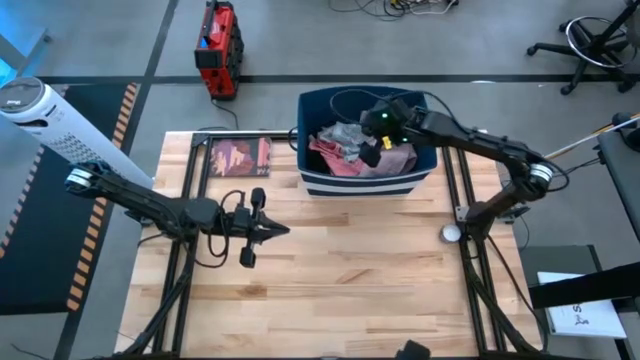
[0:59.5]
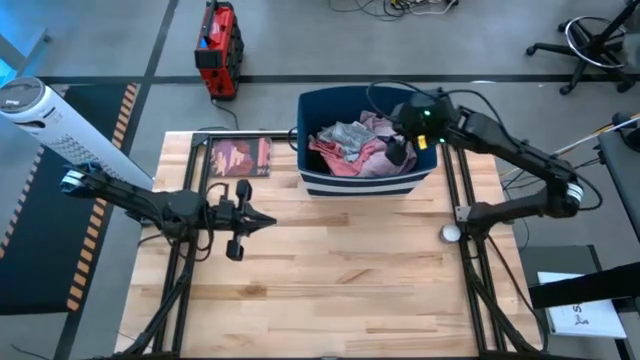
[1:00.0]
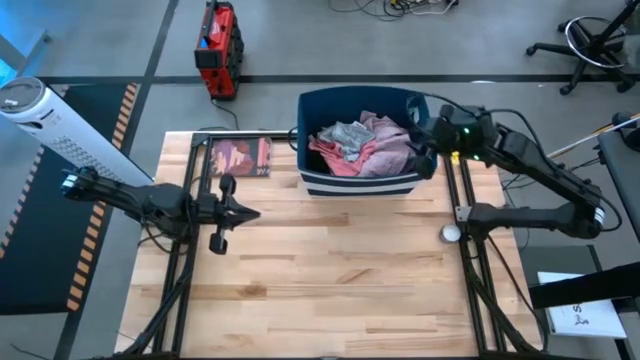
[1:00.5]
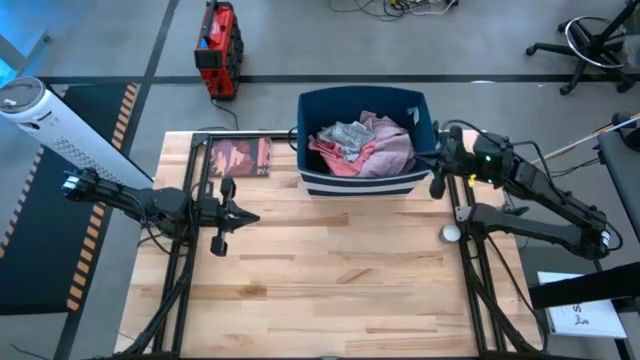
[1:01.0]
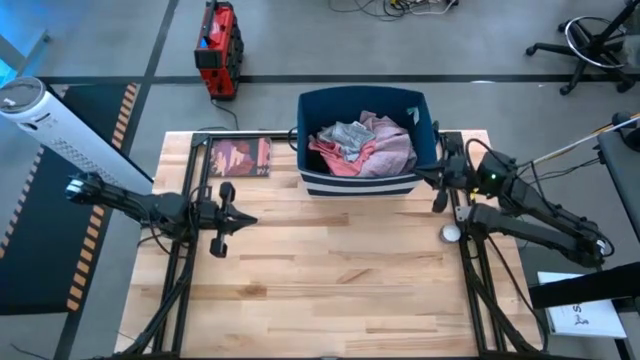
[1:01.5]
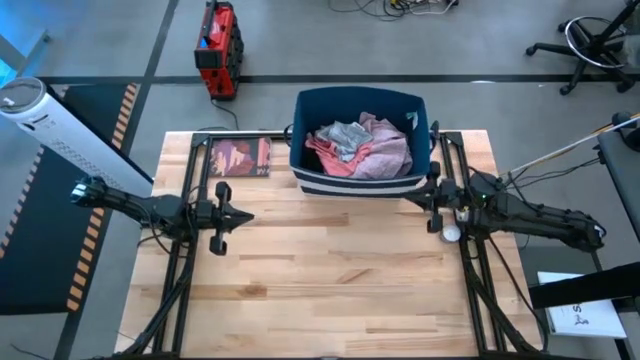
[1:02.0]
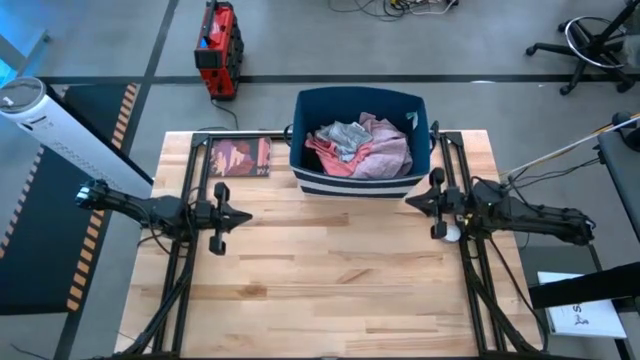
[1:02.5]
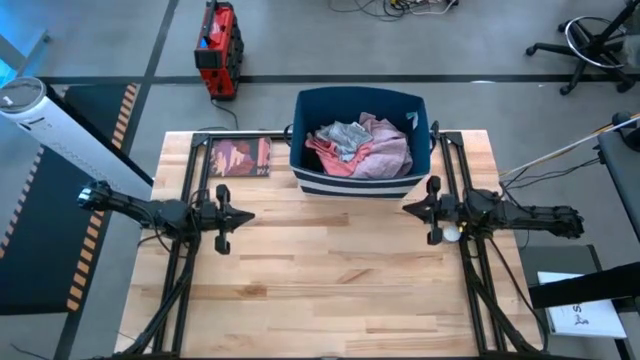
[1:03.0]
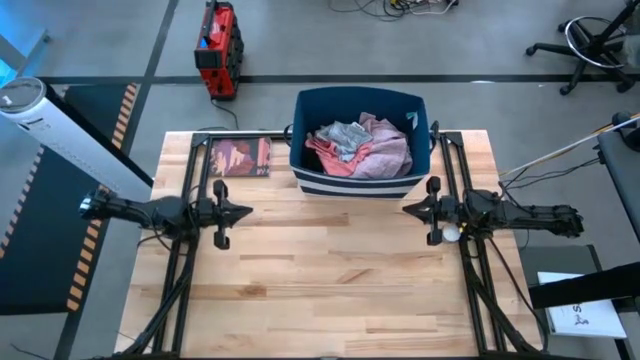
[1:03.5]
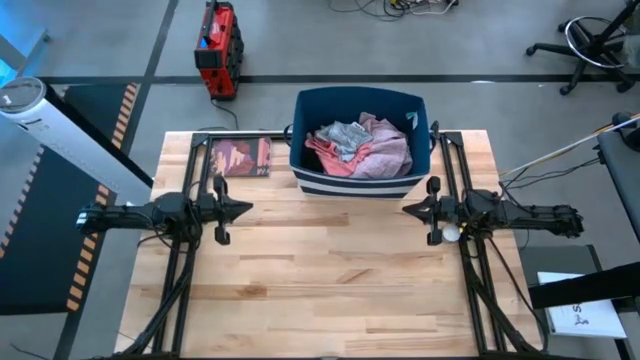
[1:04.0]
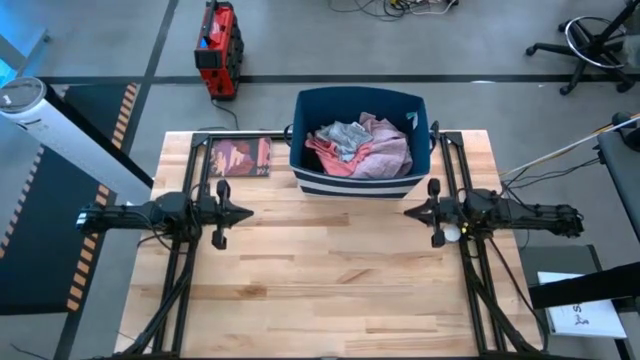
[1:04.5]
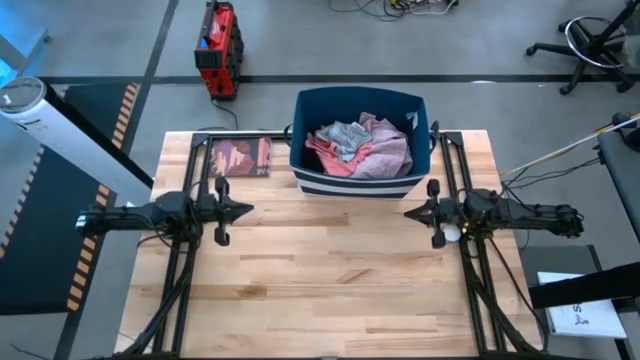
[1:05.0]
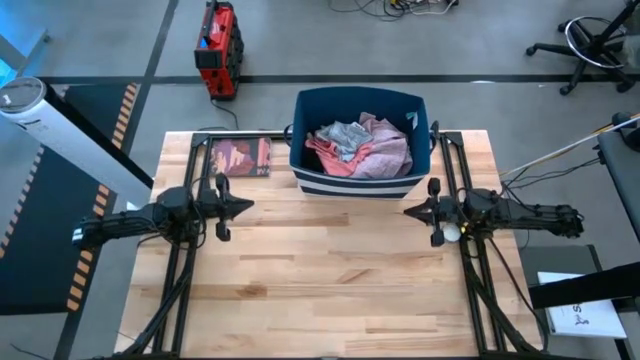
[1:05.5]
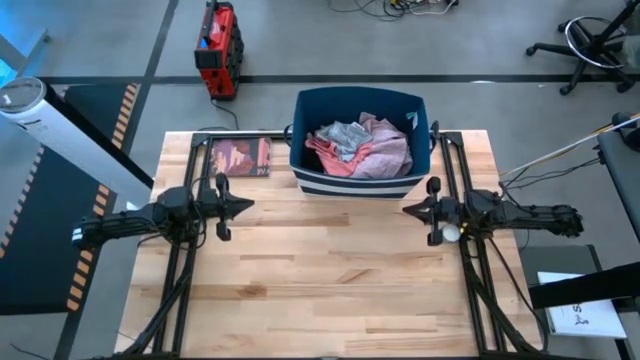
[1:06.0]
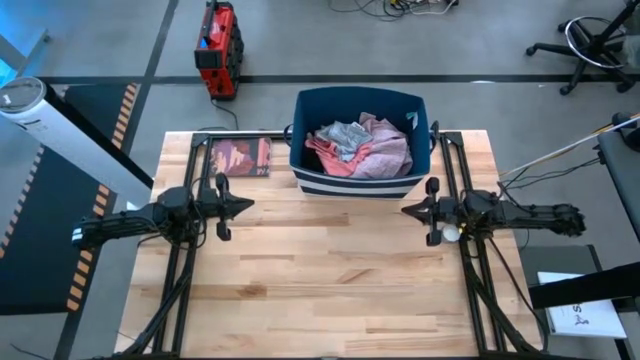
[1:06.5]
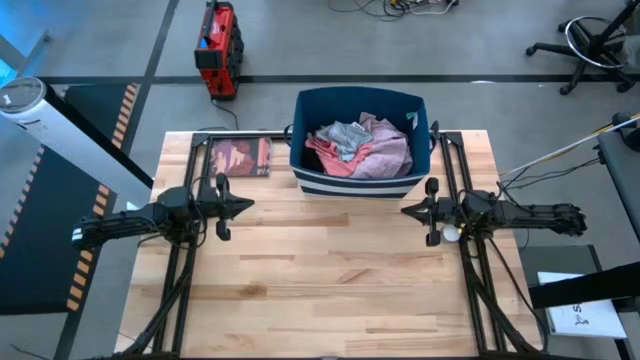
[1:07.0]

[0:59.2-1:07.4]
Task: Sort clothes
Return to Home Position

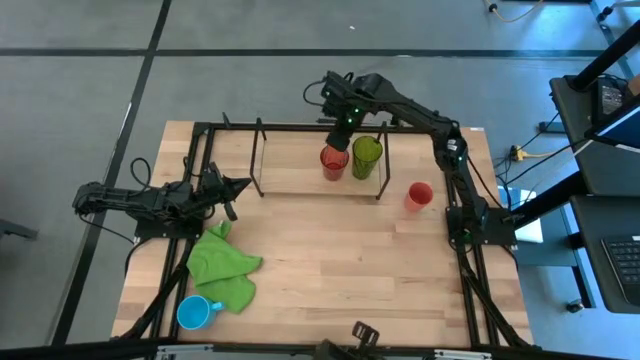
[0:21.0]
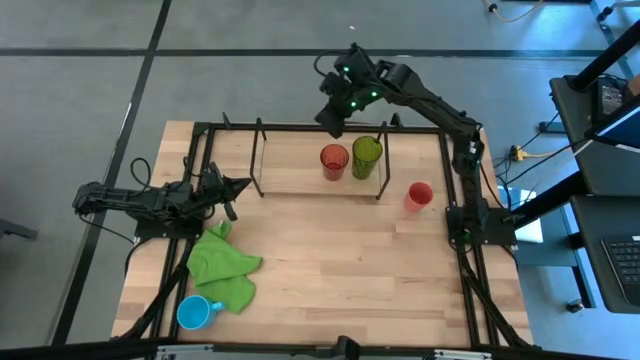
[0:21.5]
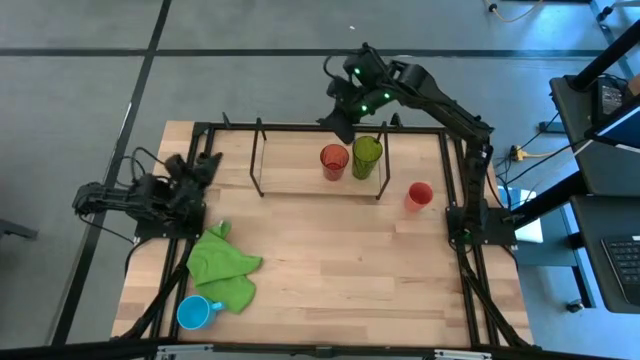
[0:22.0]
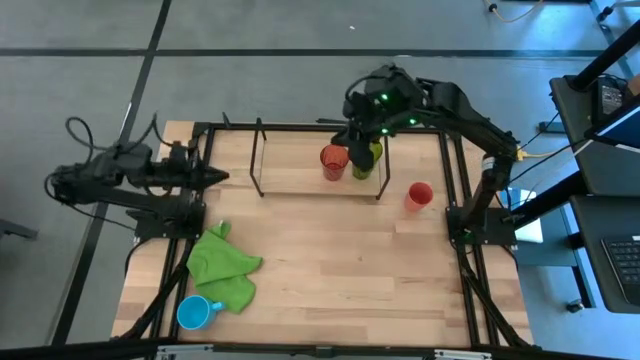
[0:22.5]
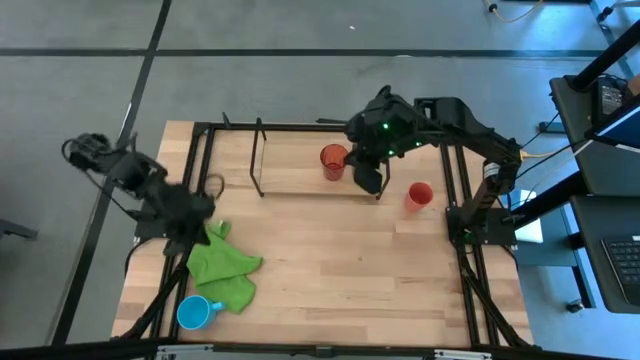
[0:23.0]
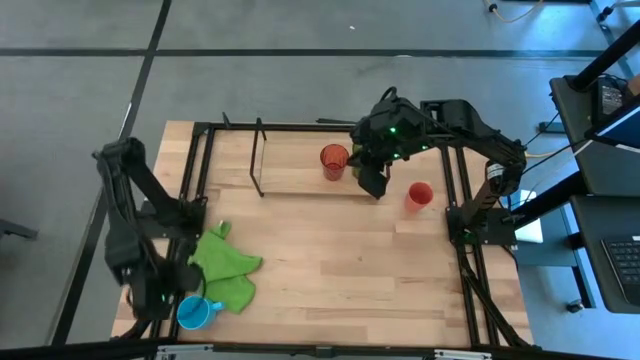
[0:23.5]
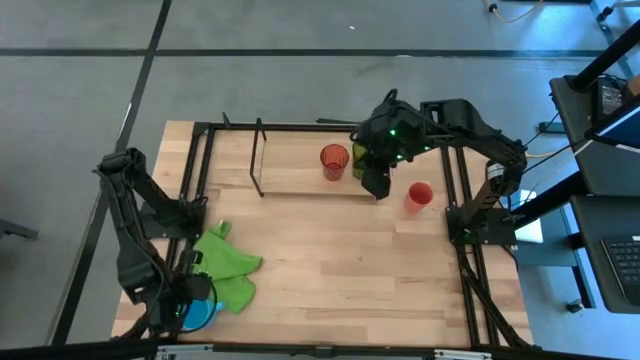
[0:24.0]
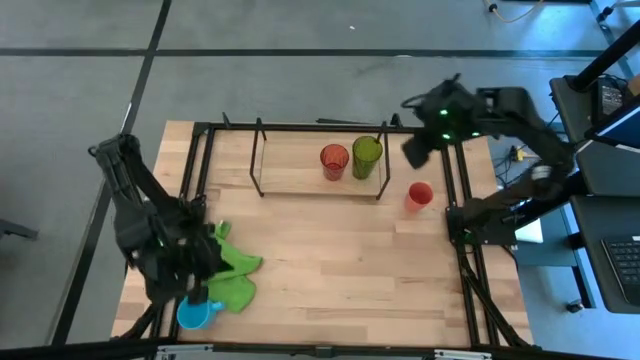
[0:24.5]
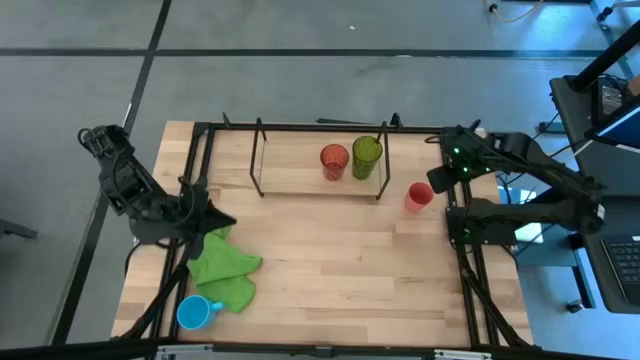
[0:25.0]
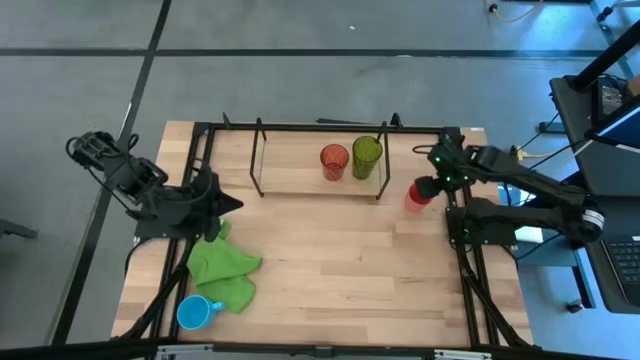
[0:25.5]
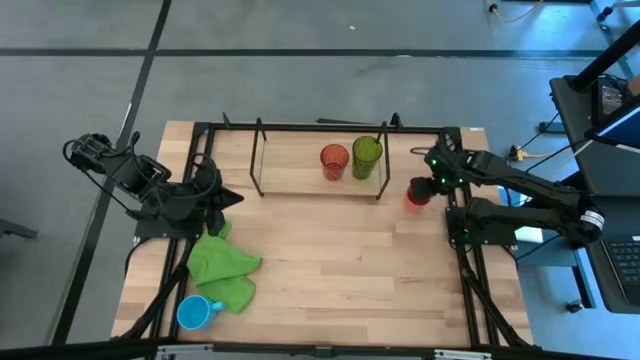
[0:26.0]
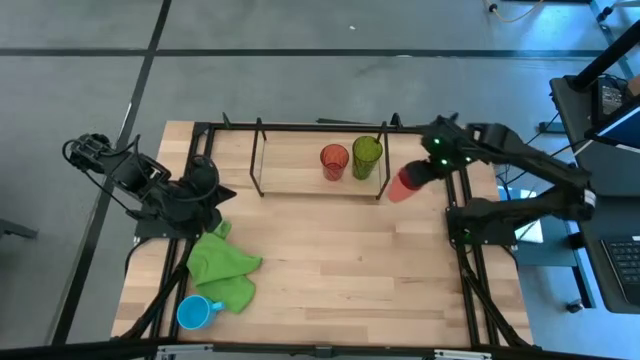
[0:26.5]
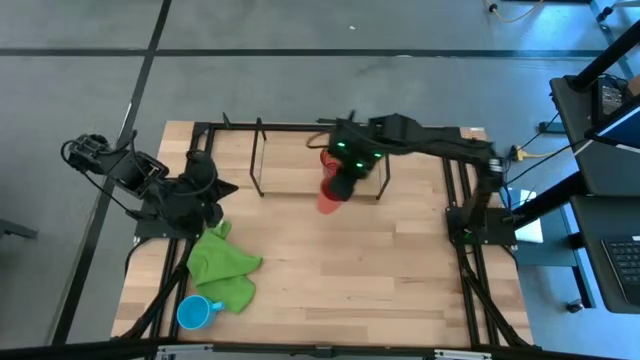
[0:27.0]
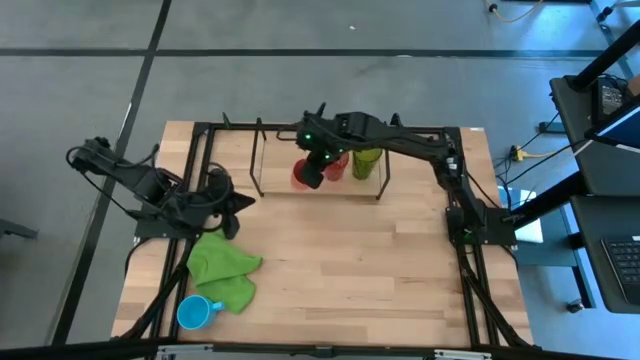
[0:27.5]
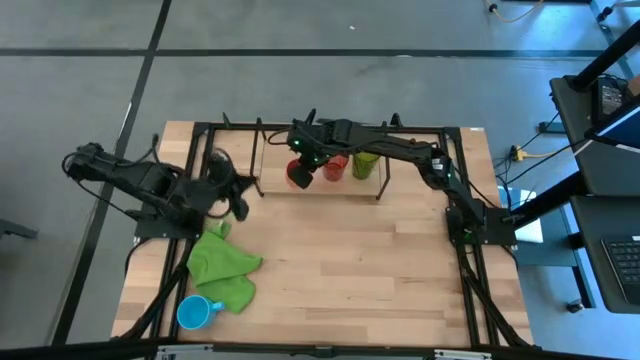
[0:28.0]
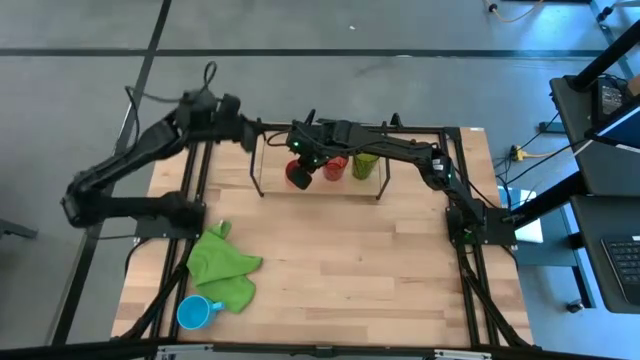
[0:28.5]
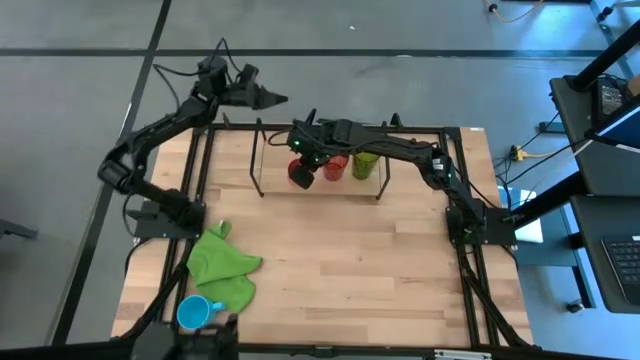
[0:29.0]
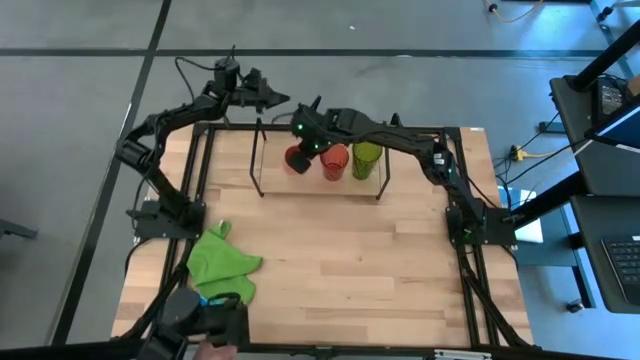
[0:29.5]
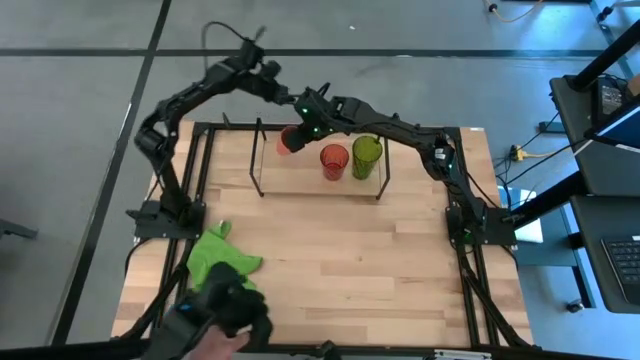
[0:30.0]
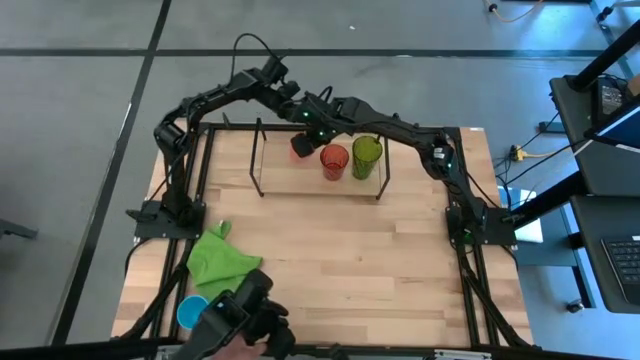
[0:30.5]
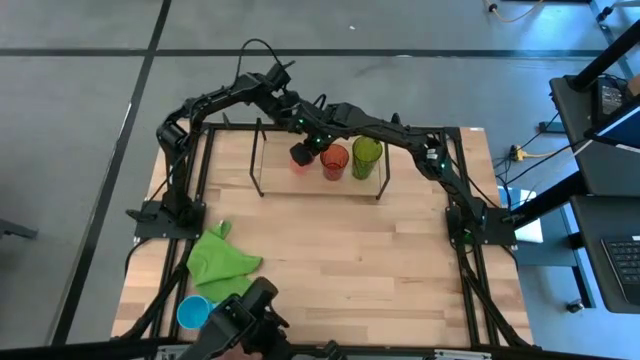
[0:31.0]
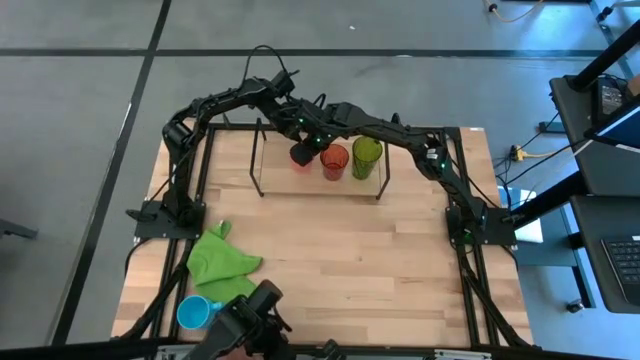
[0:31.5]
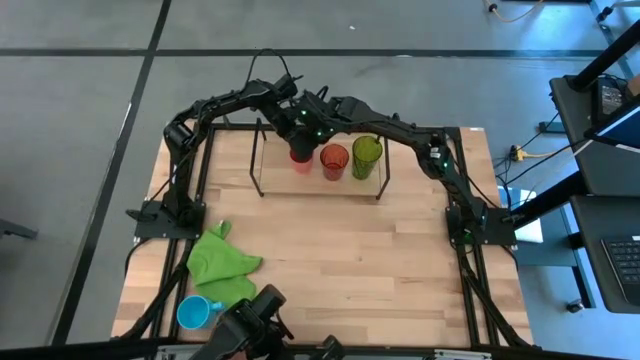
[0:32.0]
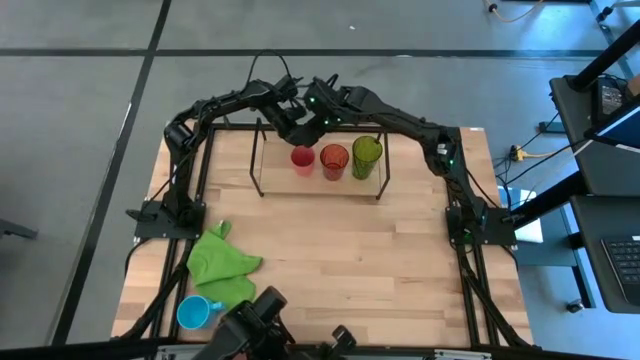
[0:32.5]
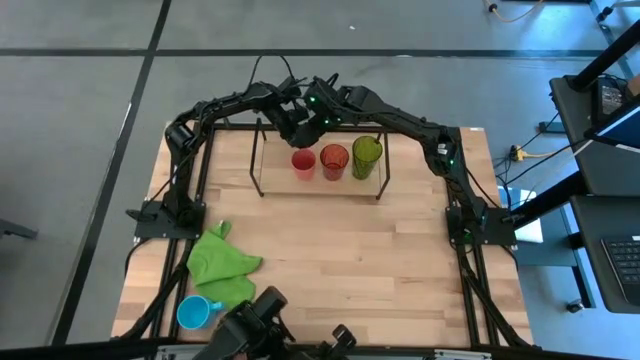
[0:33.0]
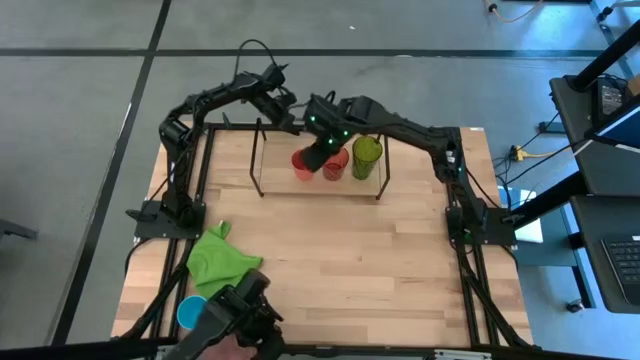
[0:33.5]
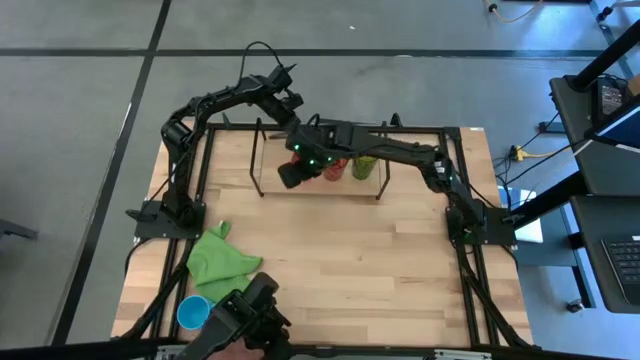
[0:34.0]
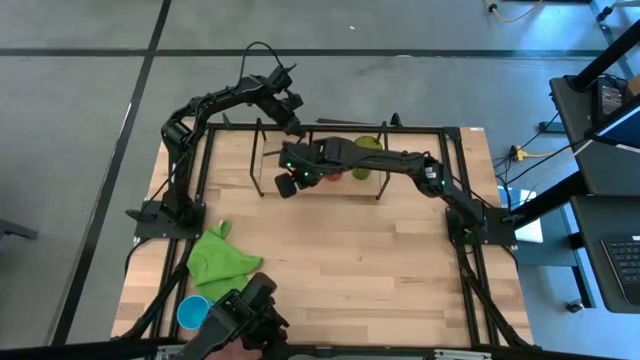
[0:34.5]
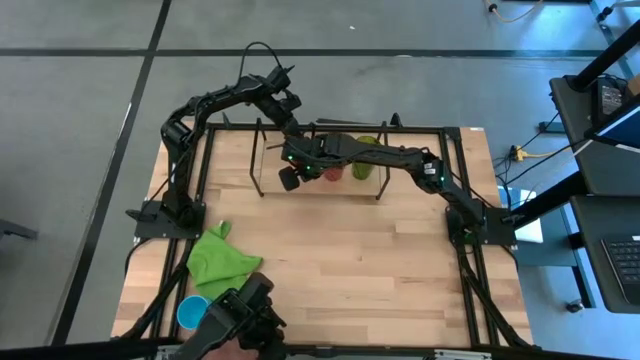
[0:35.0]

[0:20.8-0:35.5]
Task: Stack small to large cups/mugs on shelf
Put the orange cup on the shelf
